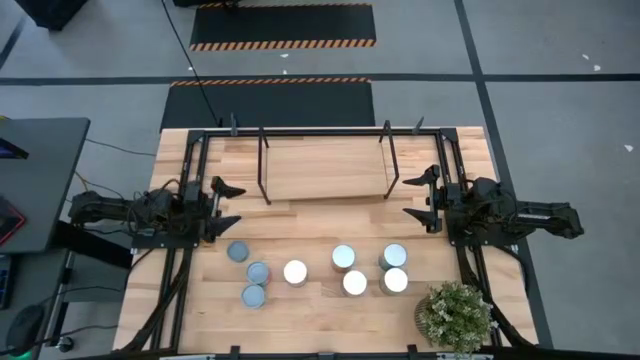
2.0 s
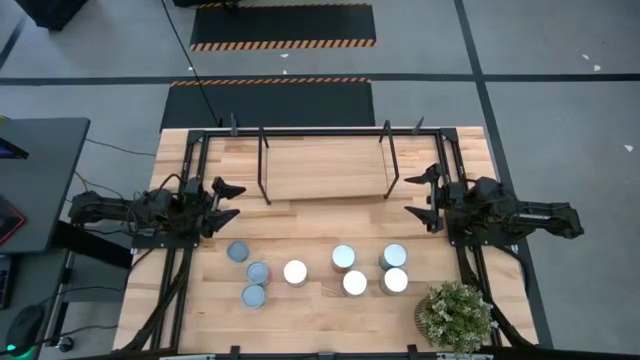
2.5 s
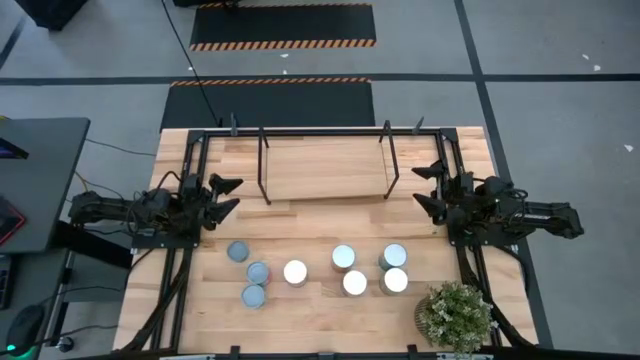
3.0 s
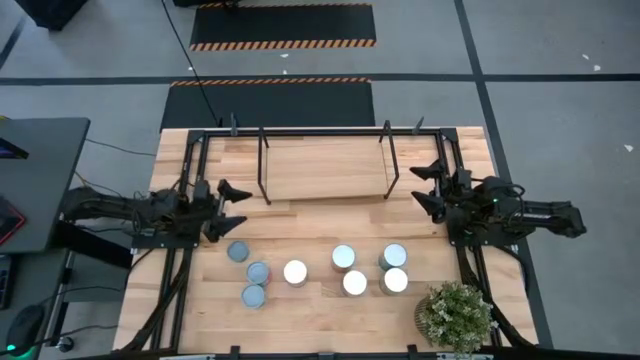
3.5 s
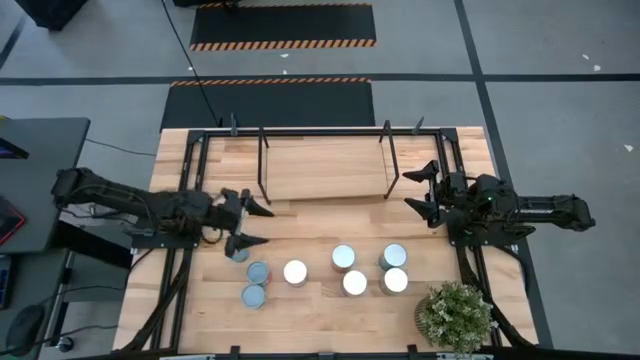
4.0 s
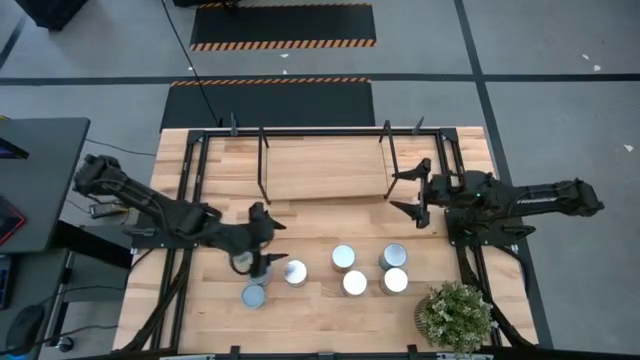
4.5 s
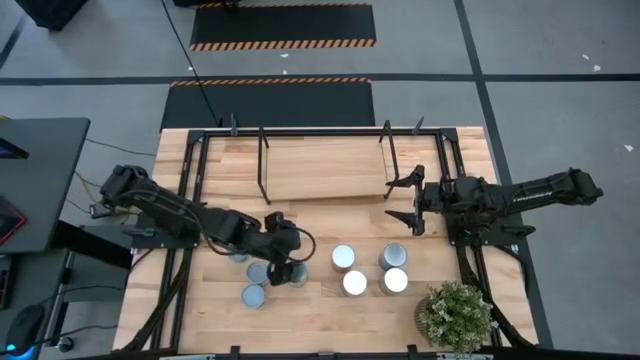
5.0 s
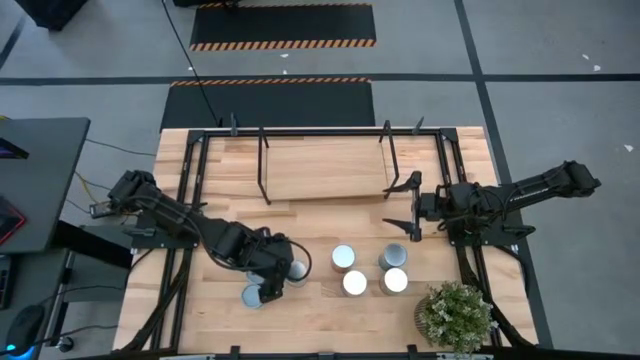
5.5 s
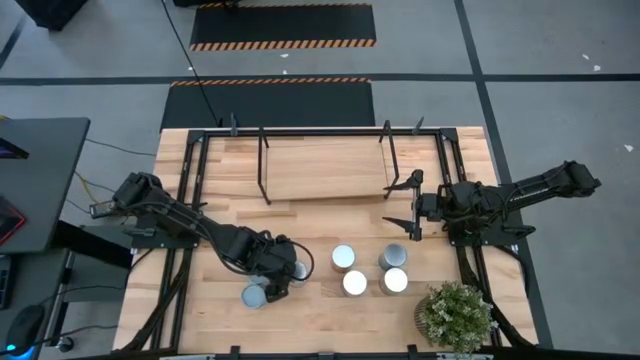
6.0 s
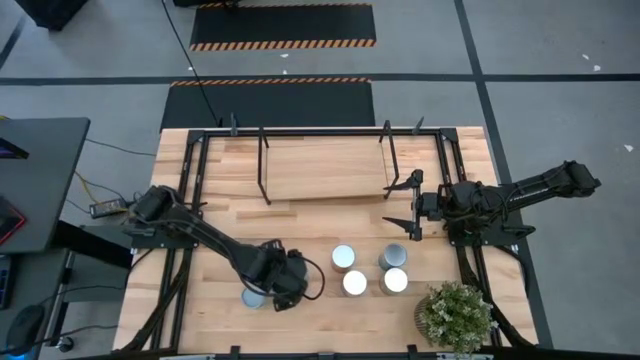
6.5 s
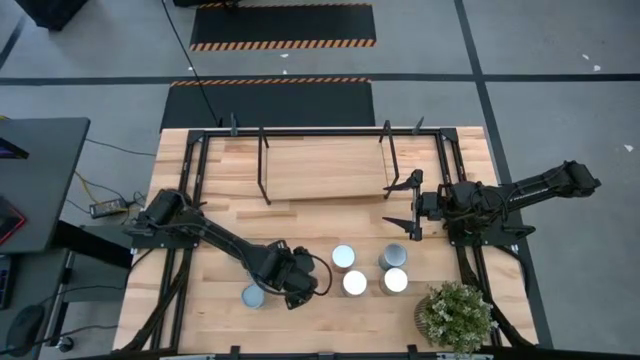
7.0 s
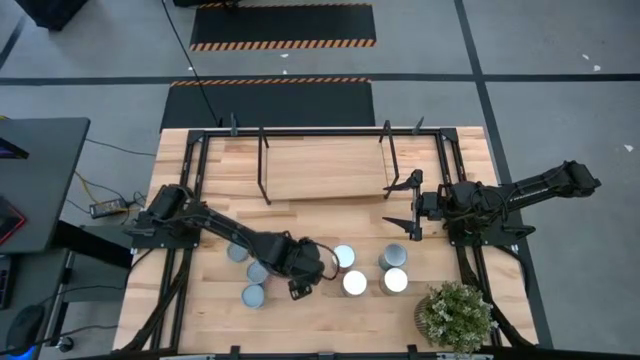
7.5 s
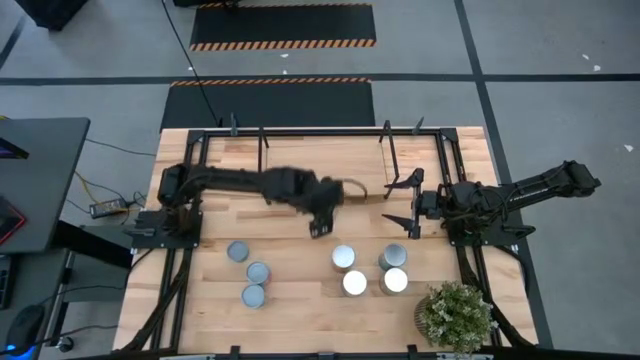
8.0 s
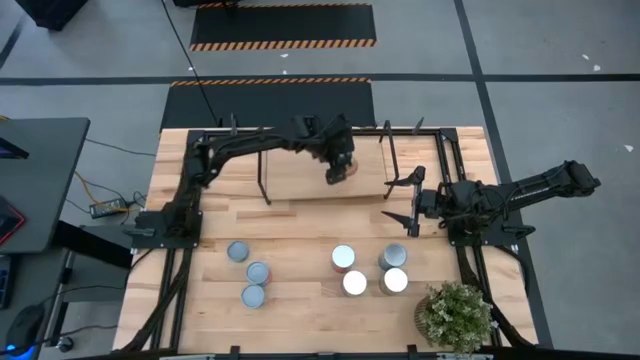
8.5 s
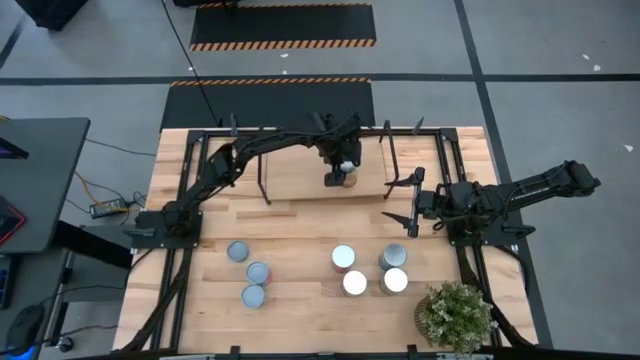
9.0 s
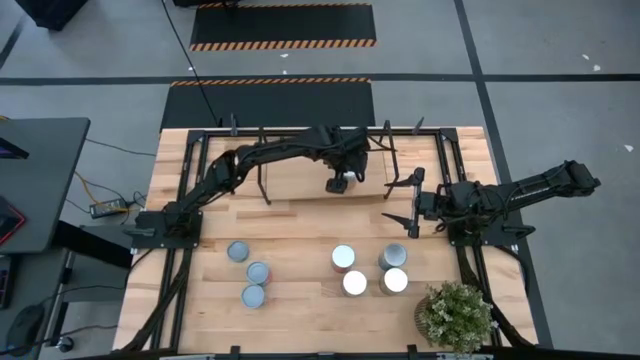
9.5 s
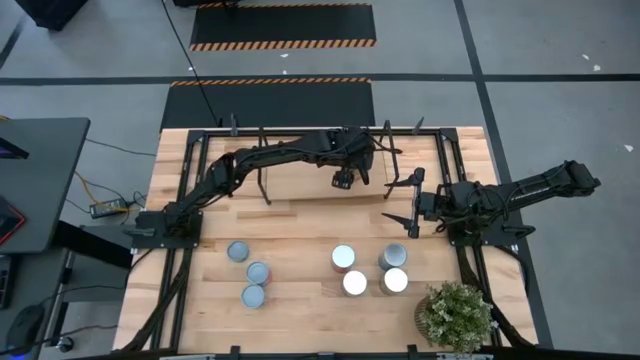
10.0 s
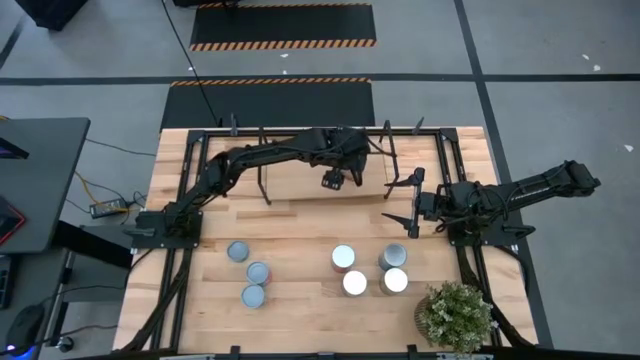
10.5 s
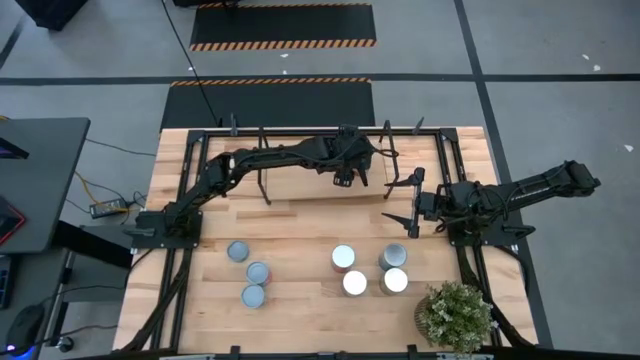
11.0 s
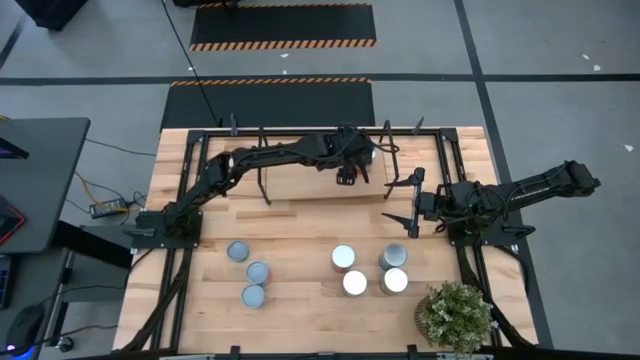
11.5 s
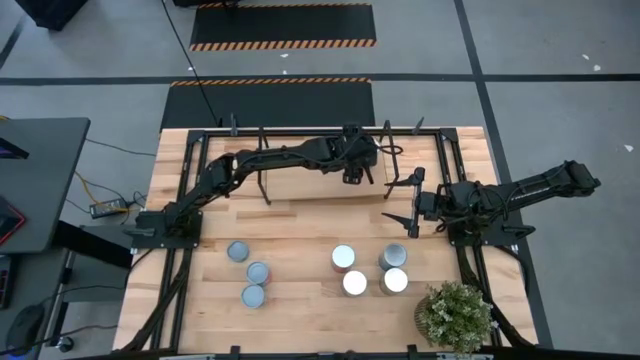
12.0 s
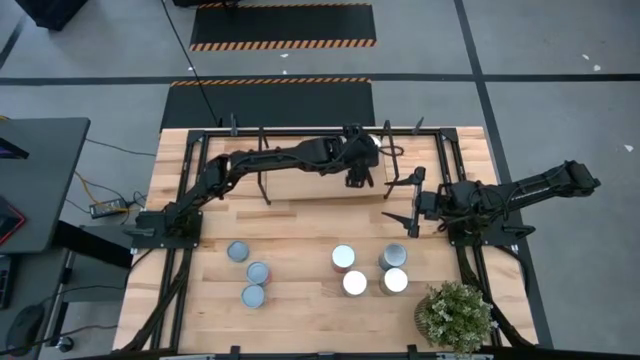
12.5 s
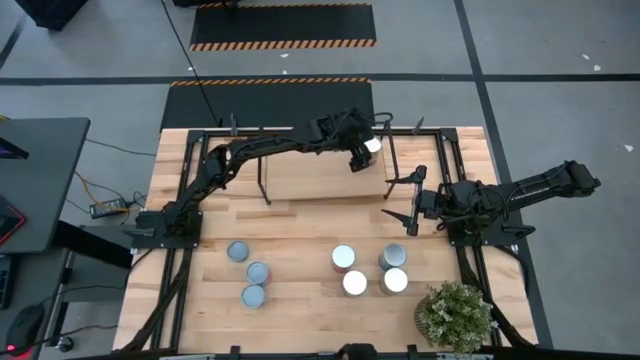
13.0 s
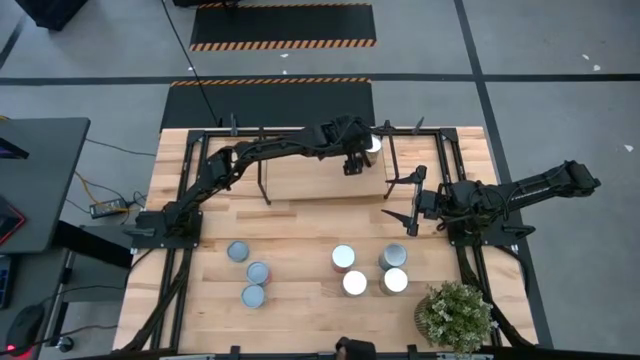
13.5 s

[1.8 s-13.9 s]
Task: Pick and place cans onto a shelf
Put the canned corn on the shelf

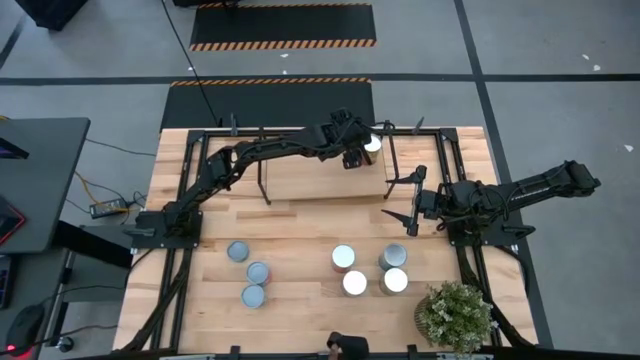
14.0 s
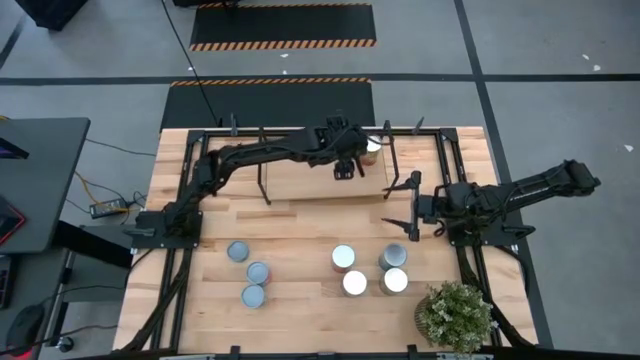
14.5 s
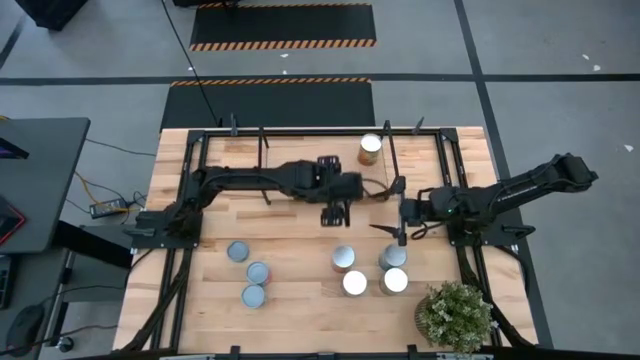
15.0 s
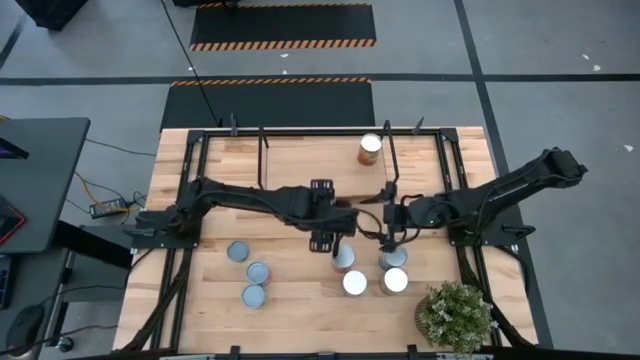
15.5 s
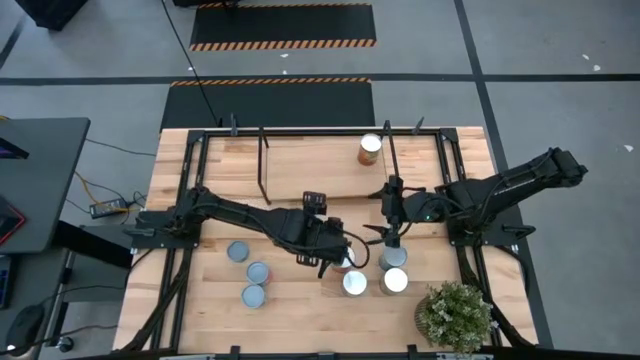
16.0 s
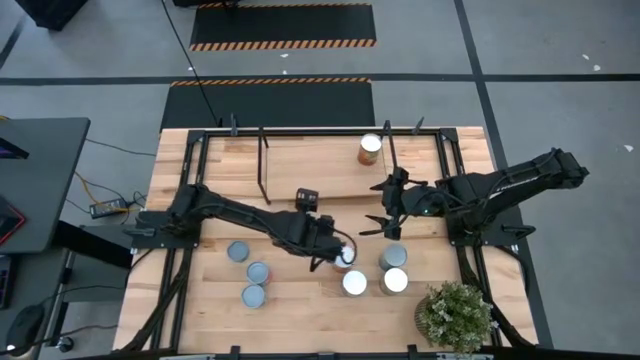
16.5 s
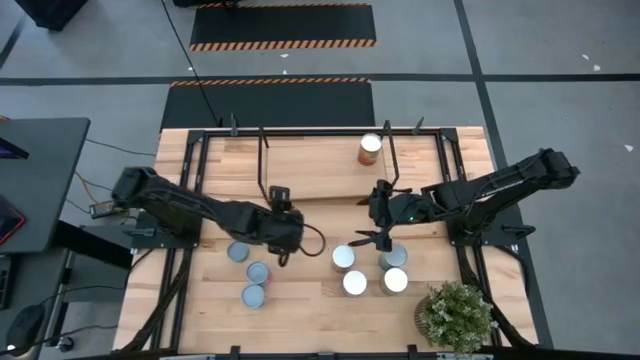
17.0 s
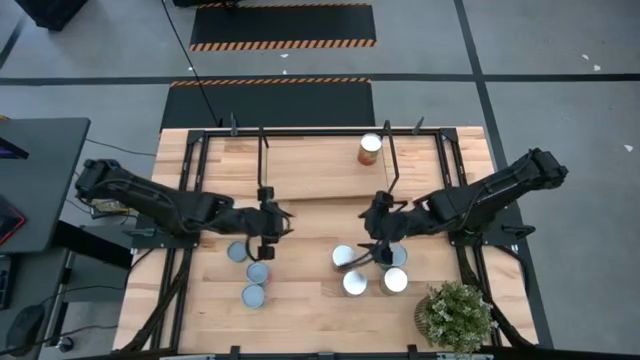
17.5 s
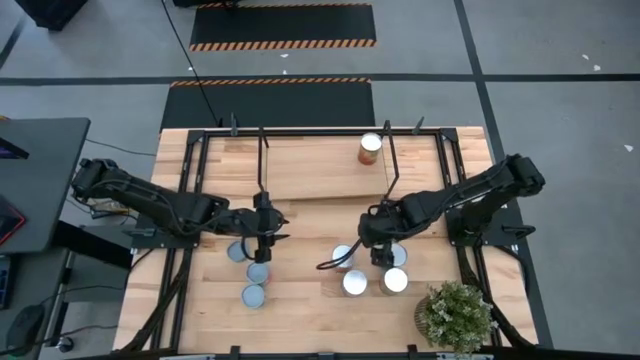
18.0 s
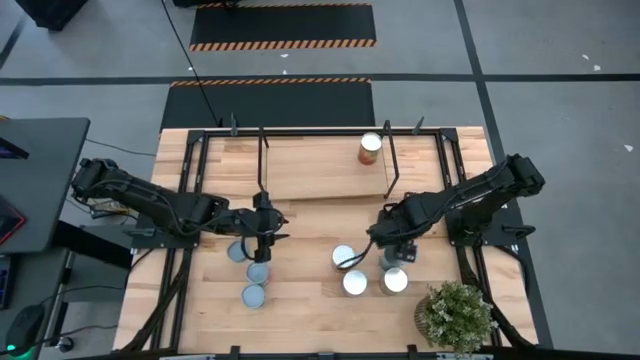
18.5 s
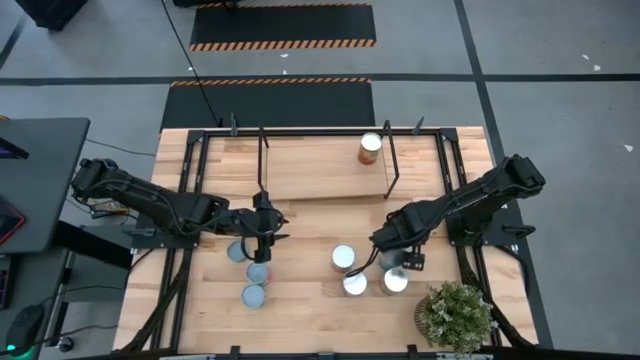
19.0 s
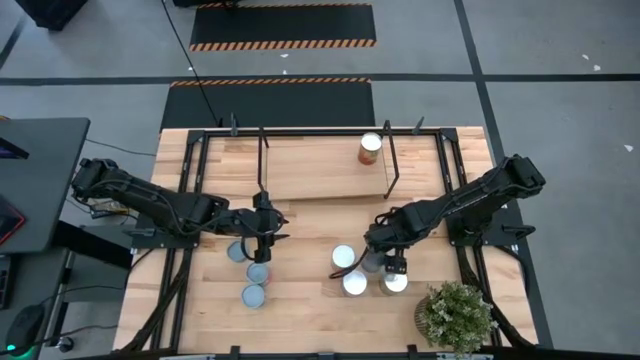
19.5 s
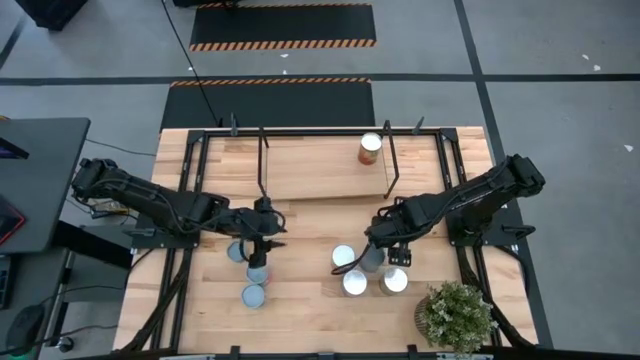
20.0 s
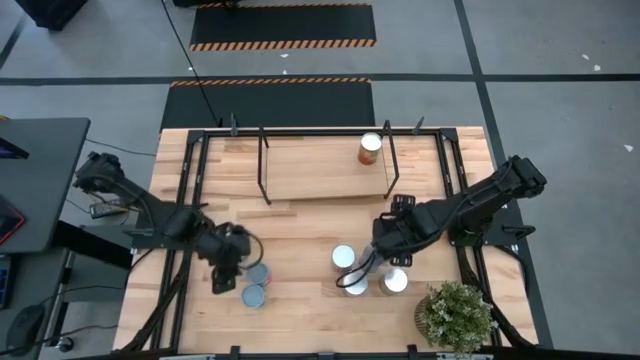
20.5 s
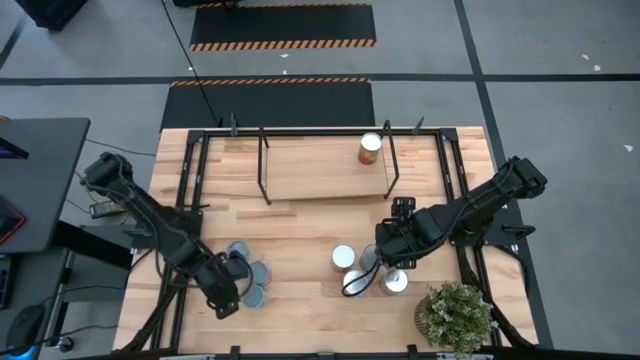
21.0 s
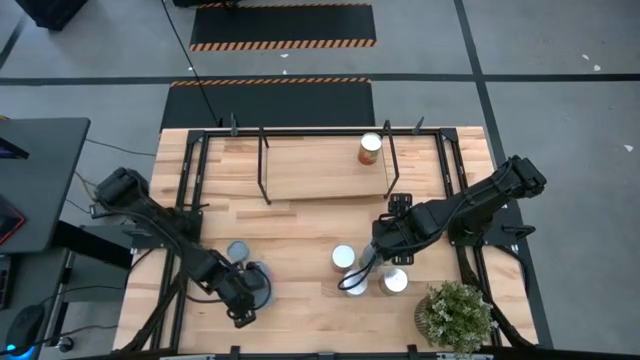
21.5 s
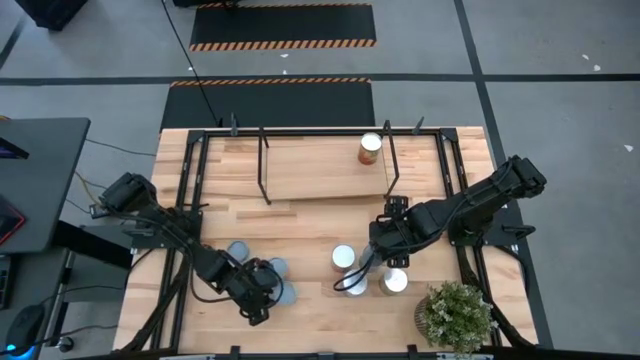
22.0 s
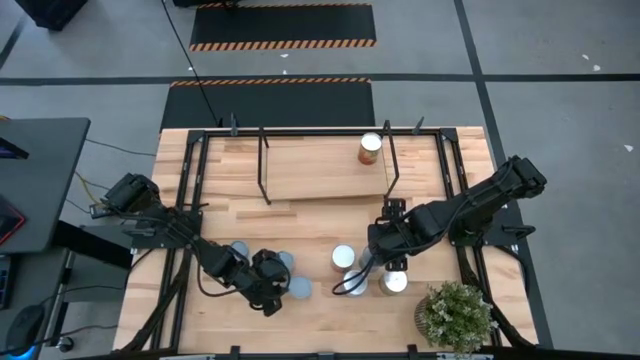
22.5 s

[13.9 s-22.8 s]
Adjust the canned goods
